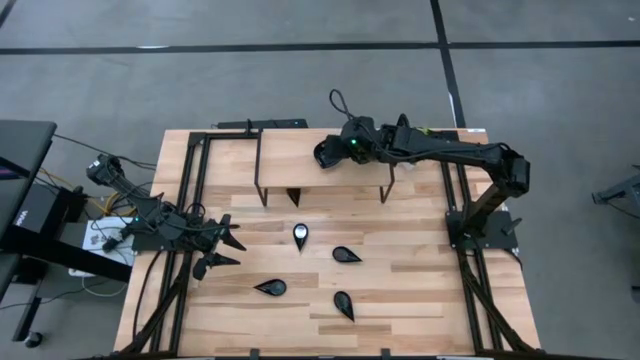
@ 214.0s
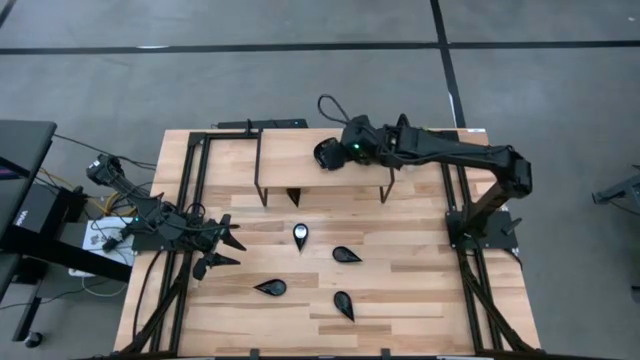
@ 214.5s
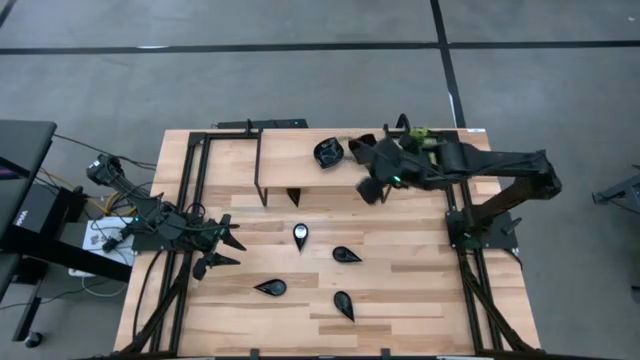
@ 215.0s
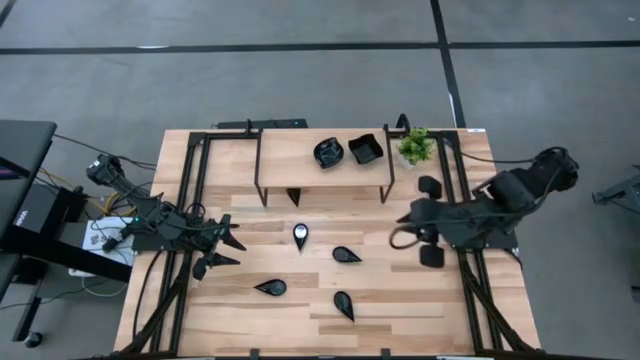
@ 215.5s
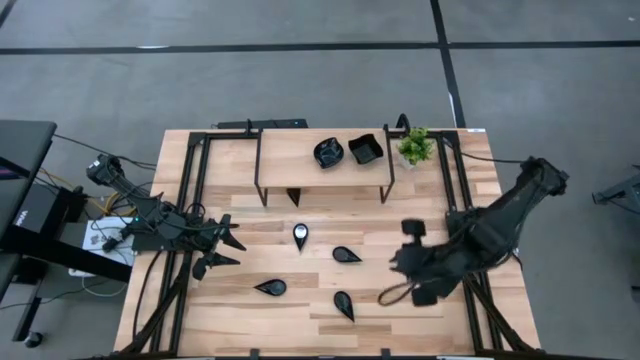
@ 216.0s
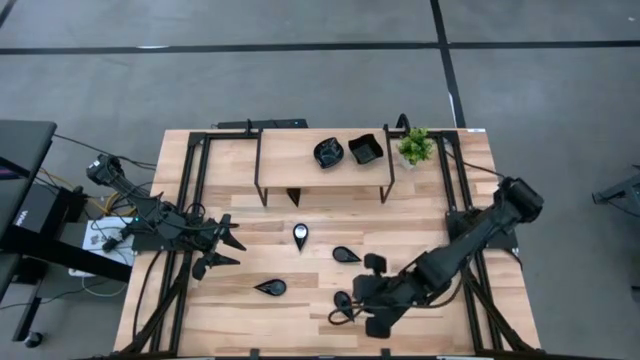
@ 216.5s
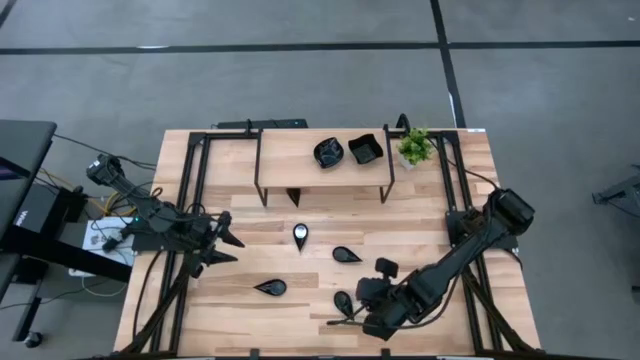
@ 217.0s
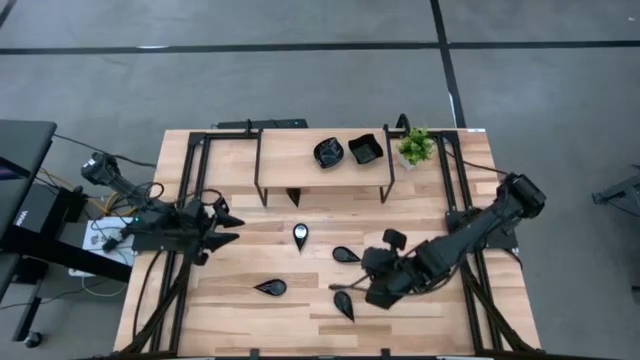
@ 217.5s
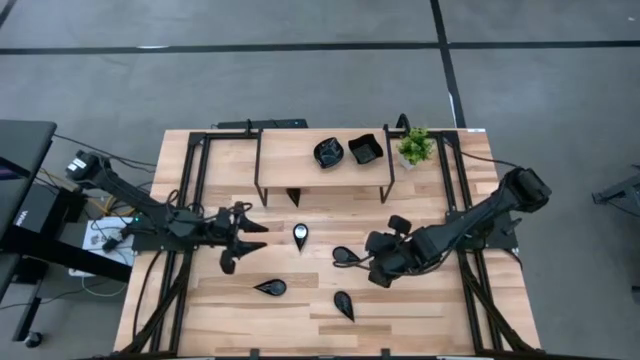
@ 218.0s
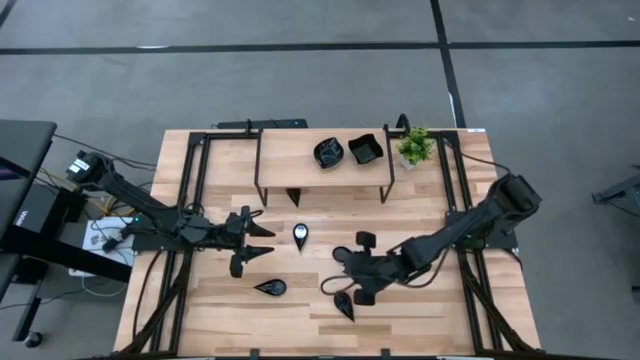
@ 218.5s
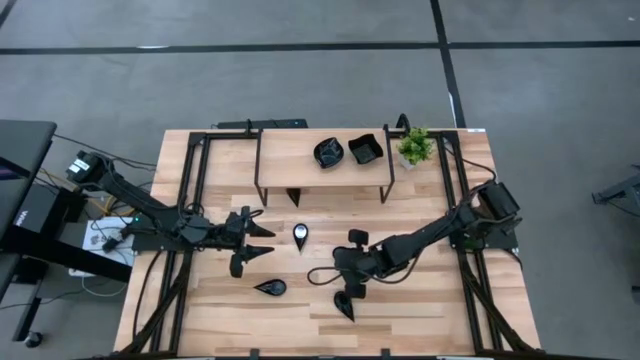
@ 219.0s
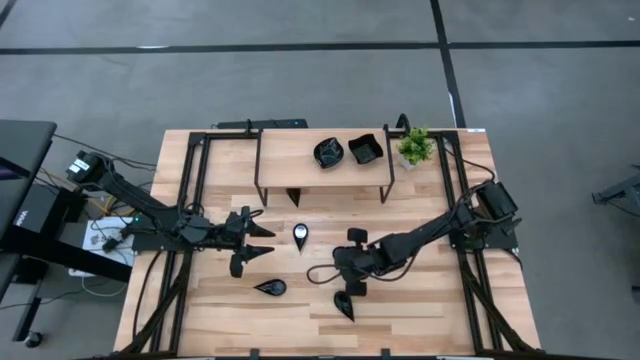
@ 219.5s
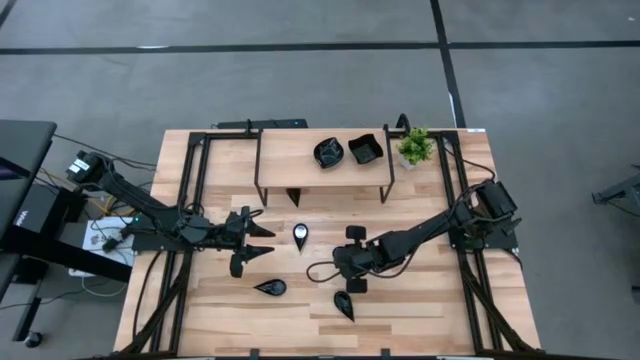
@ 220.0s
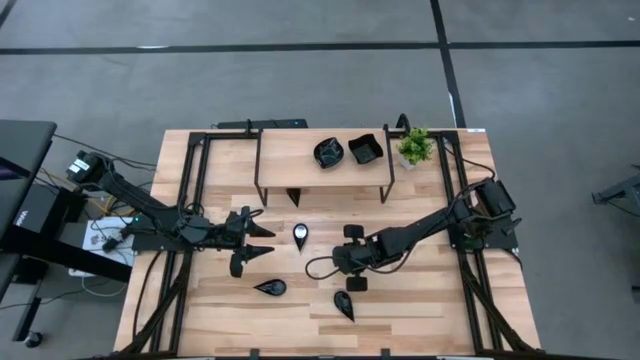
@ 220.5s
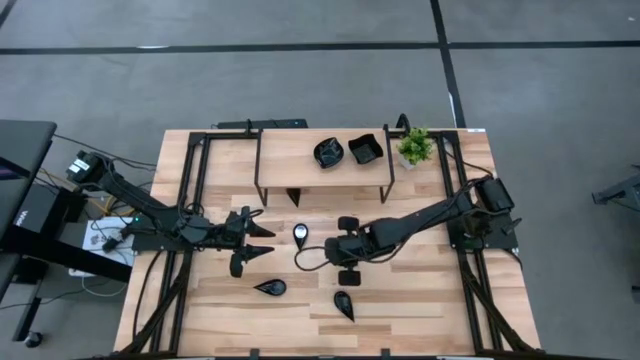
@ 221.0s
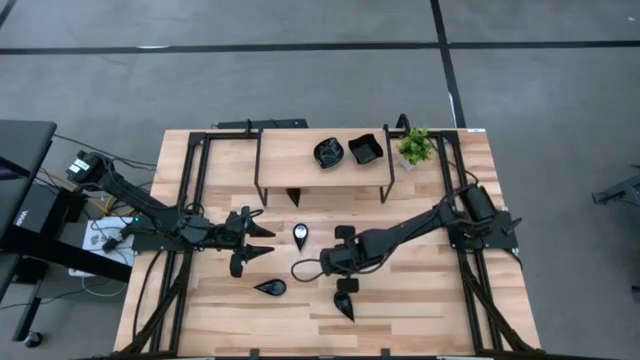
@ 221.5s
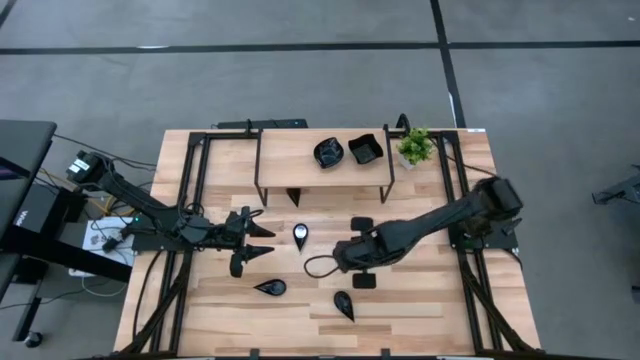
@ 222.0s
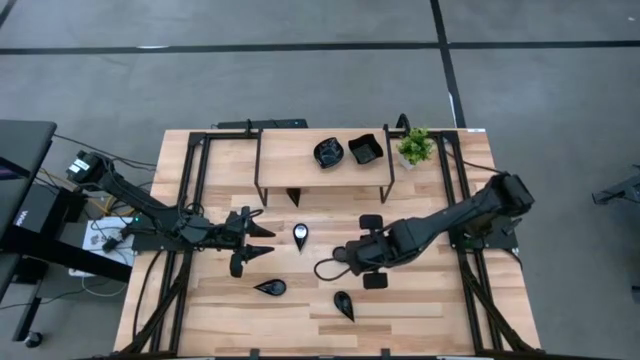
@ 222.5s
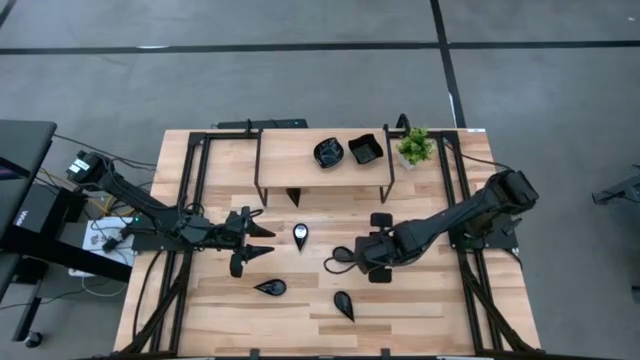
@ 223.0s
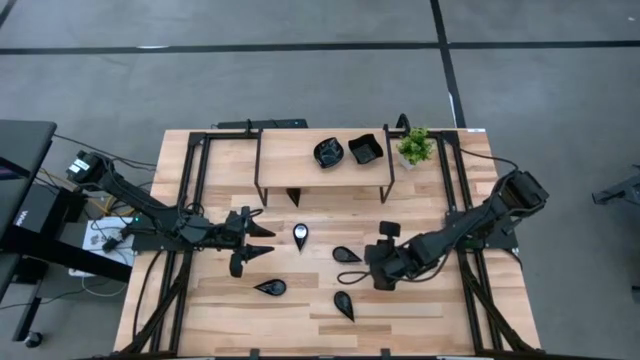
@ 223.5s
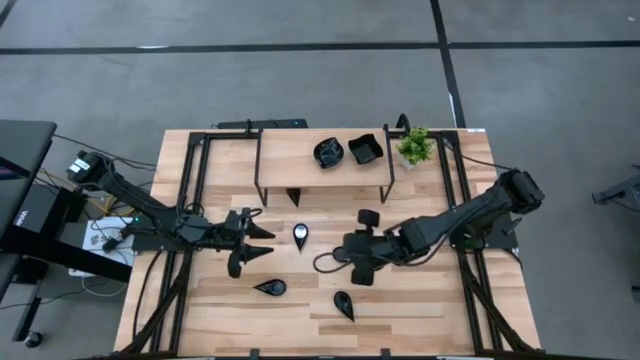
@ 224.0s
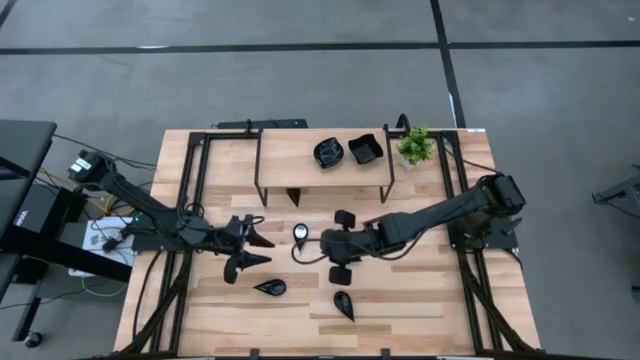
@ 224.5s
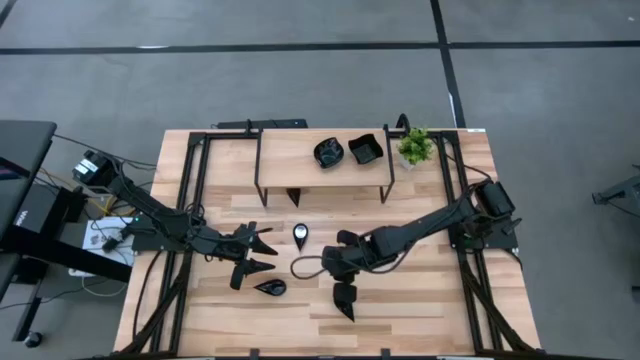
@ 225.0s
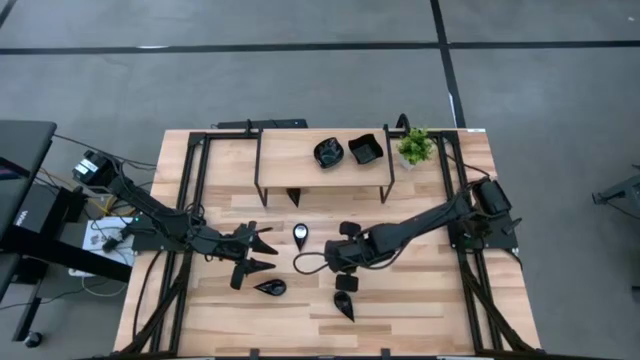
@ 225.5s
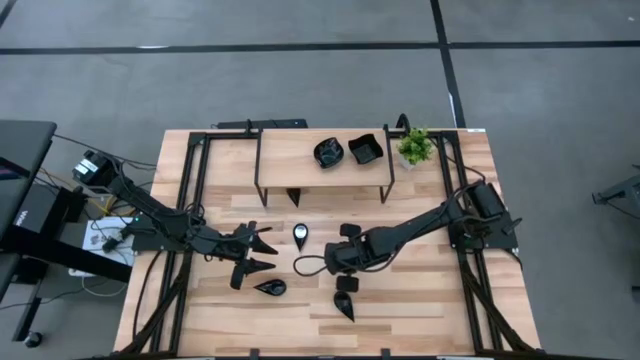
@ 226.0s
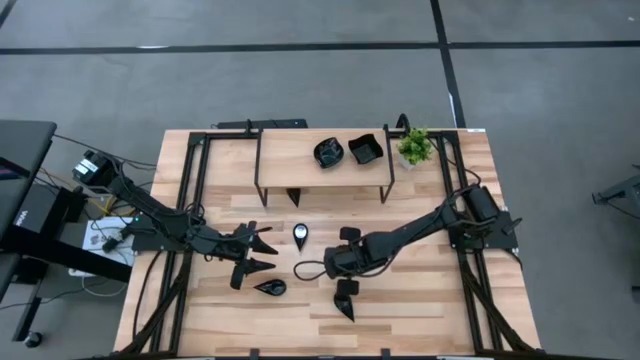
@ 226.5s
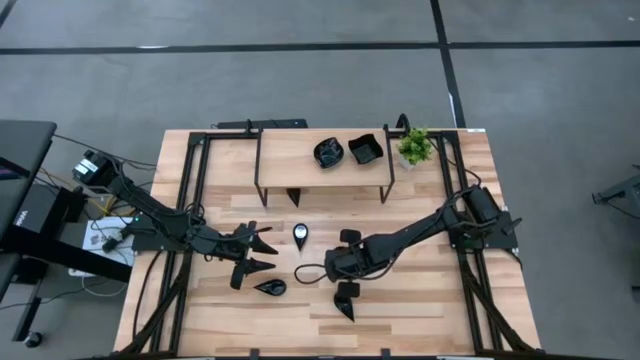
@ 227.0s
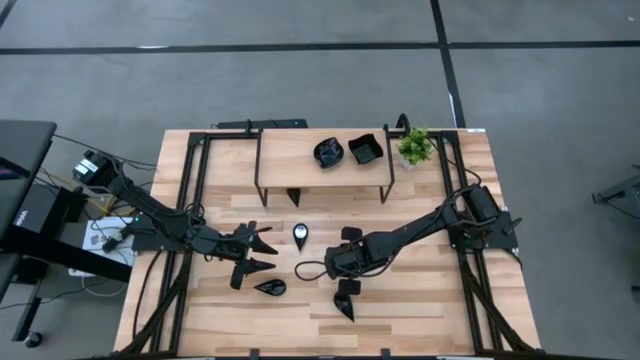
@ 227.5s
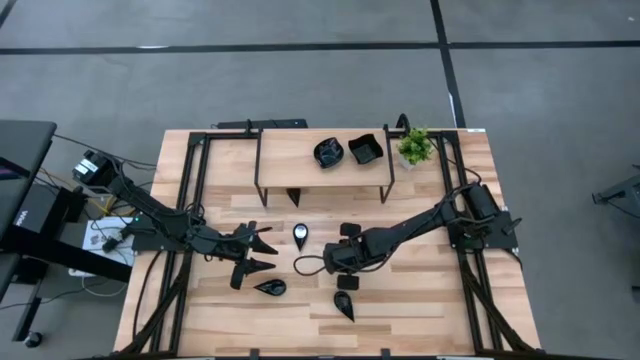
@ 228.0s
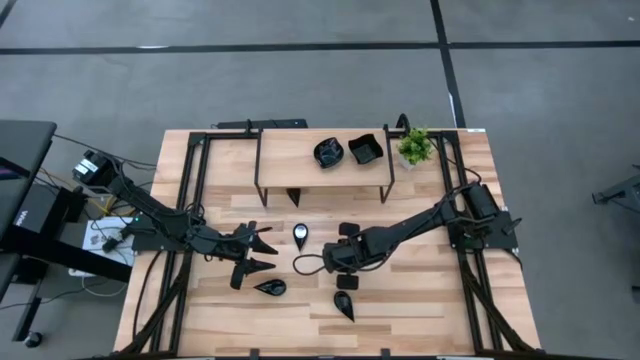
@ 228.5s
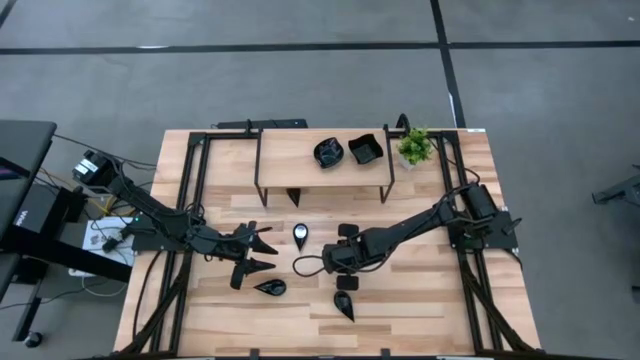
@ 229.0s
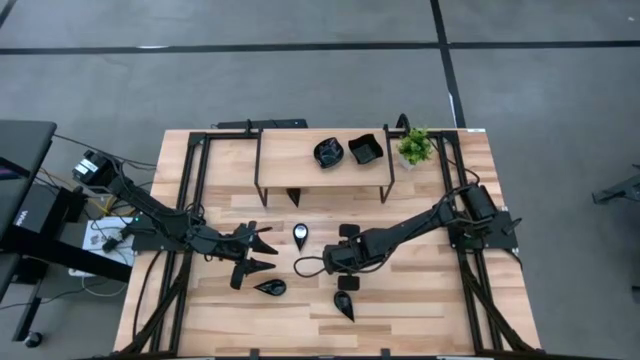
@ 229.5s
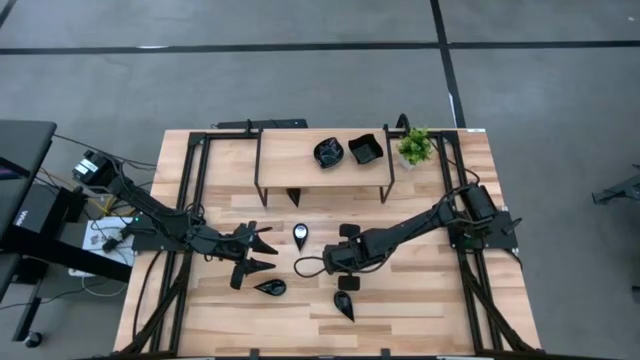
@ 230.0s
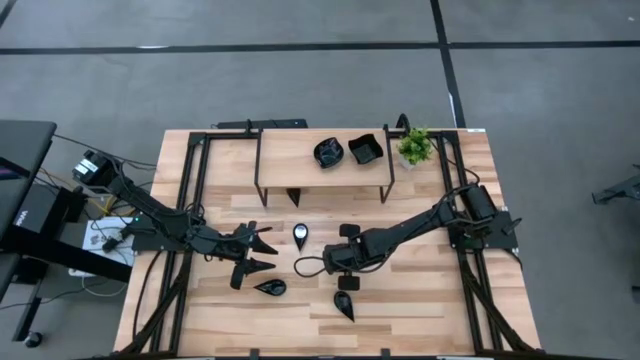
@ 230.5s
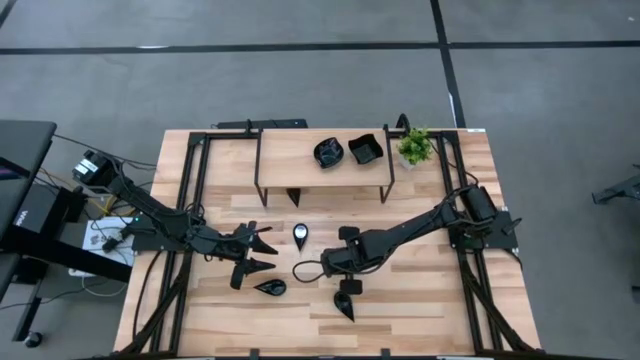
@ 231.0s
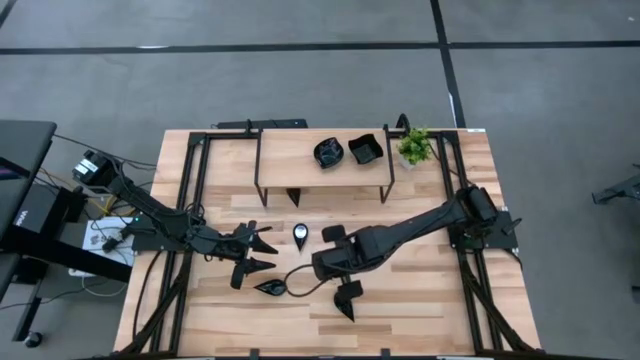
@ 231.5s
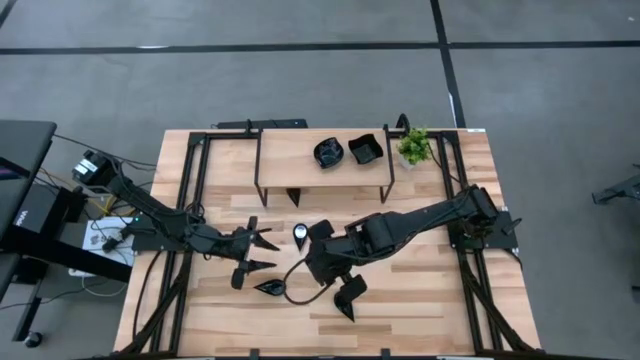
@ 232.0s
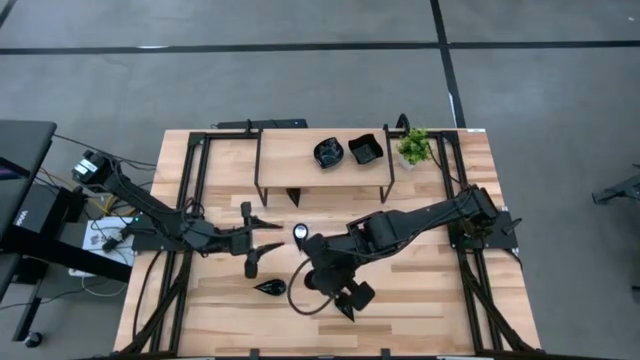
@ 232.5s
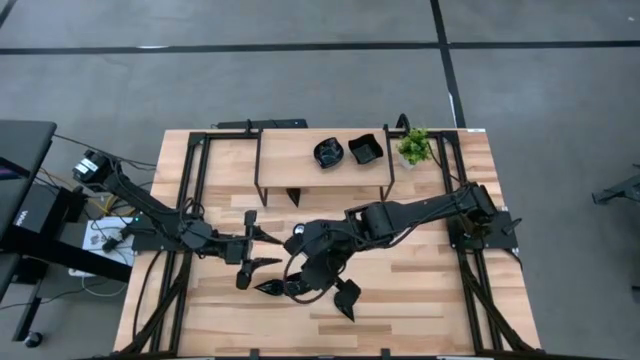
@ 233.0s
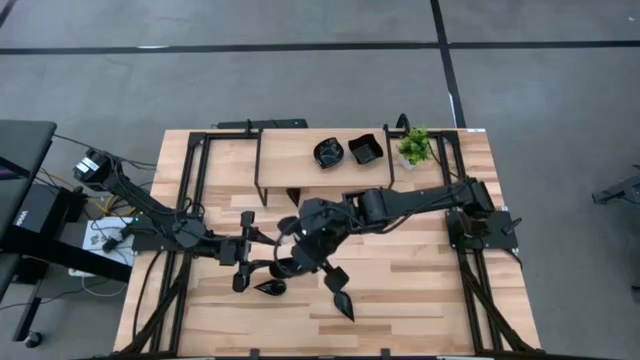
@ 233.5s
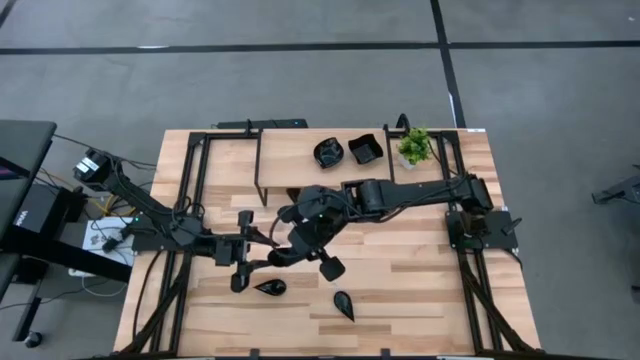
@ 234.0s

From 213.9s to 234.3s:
Task: Pick & Place Mini shaped plates
Put the black drop shaped plate on the shelf
